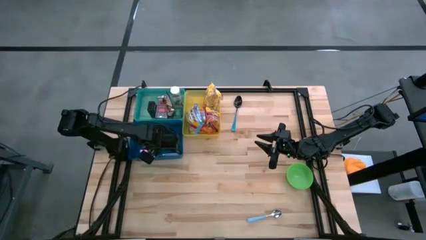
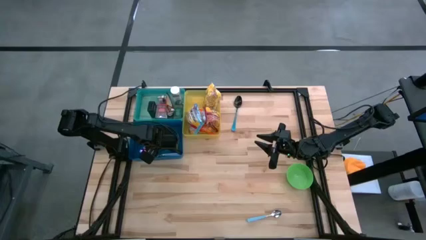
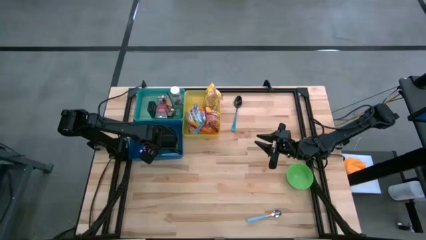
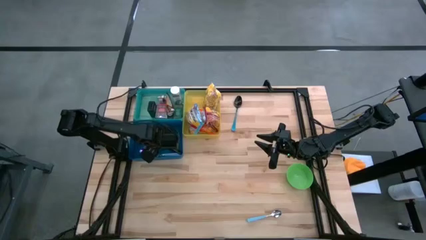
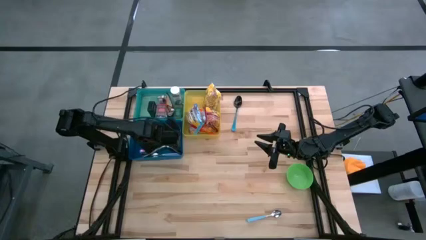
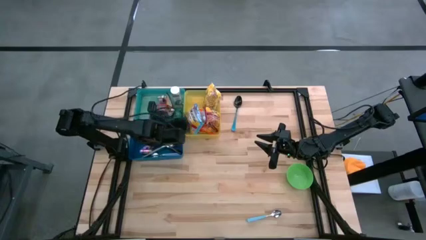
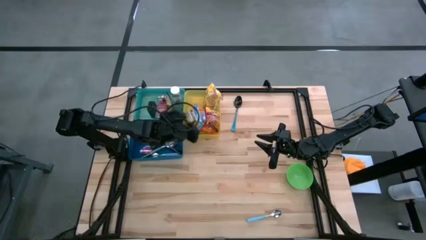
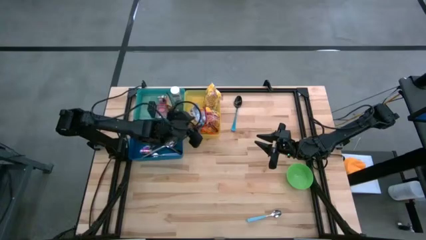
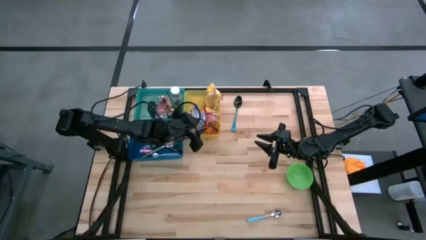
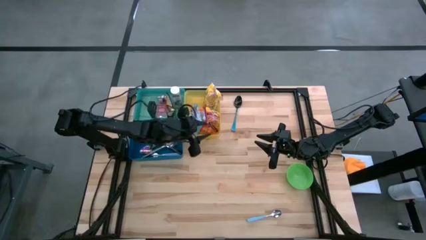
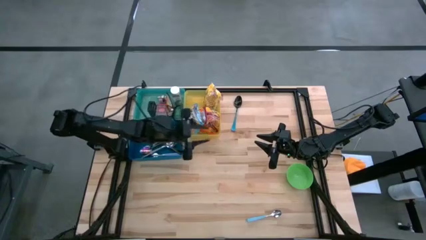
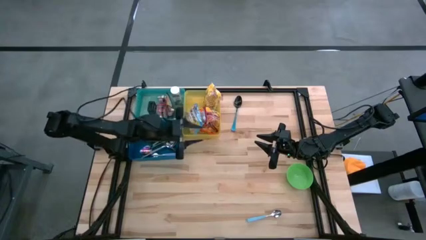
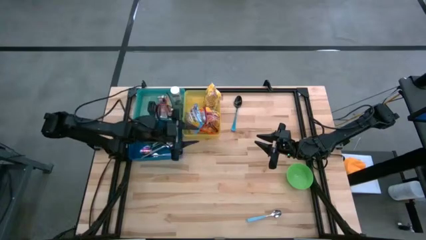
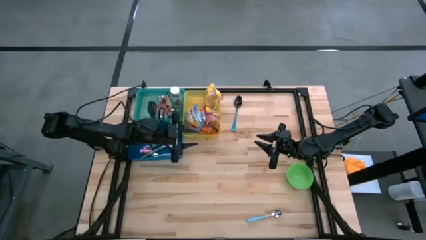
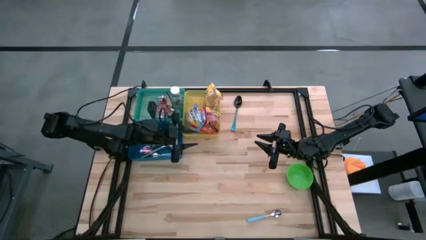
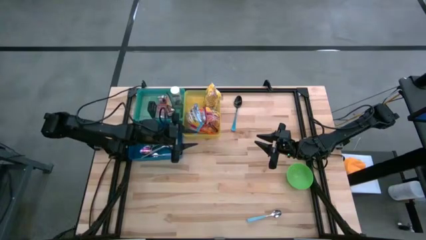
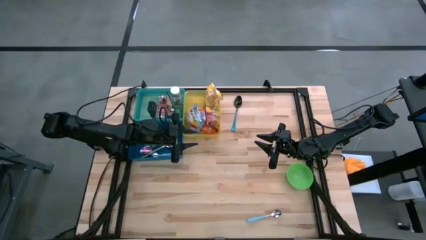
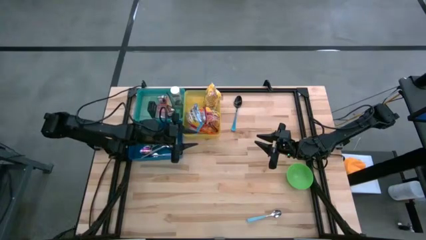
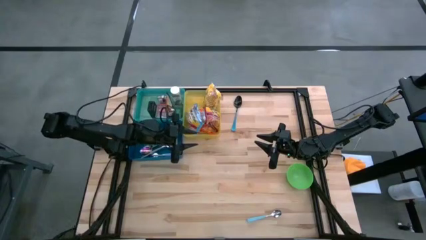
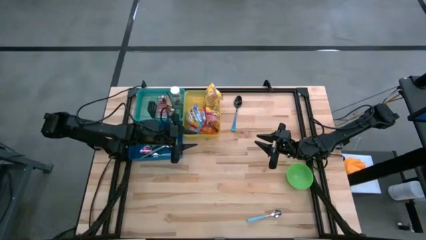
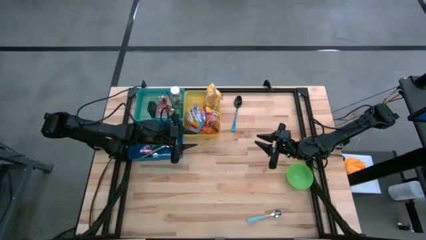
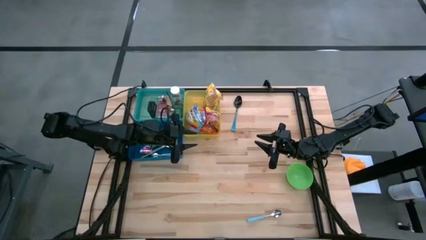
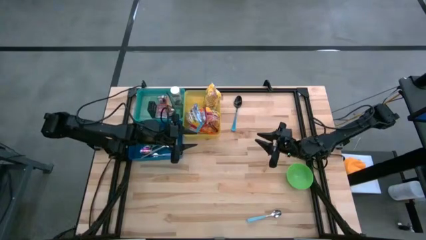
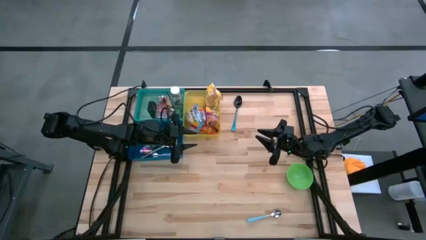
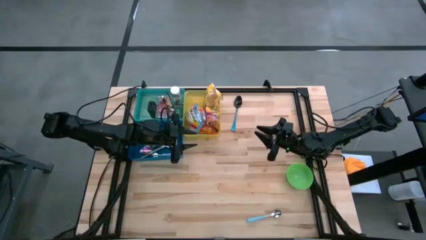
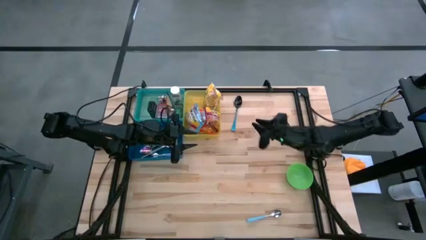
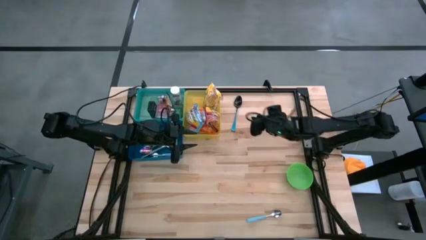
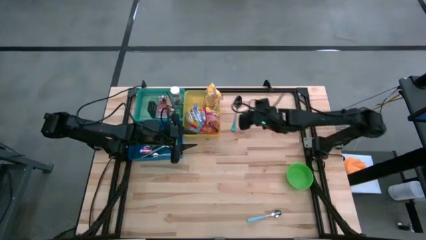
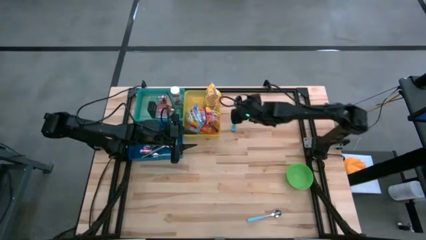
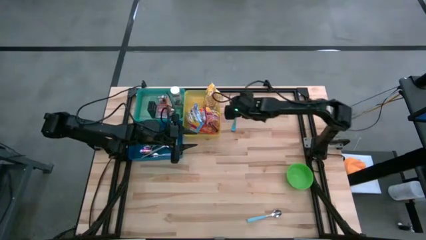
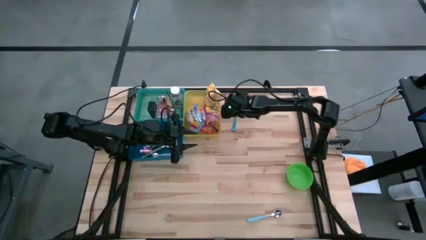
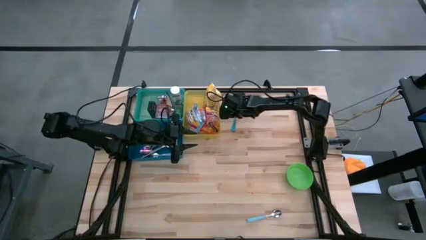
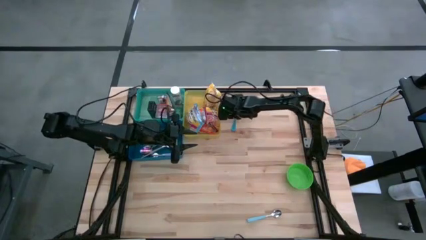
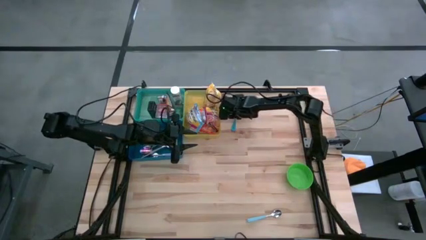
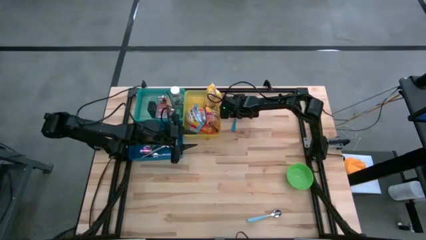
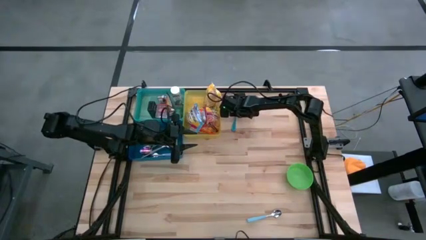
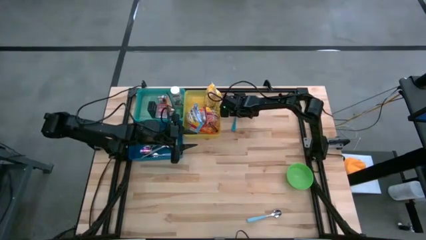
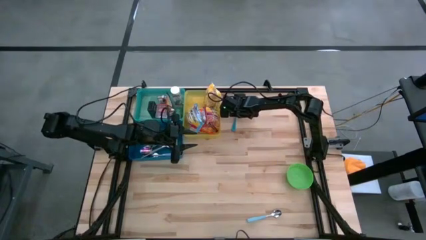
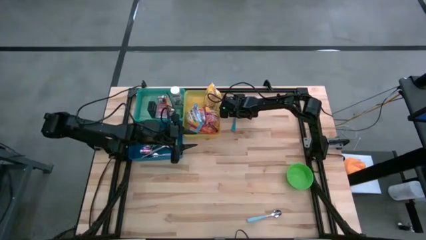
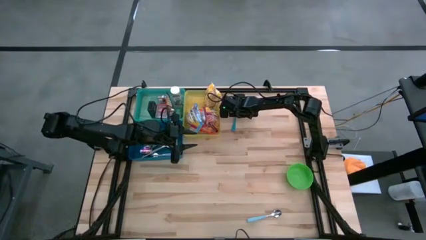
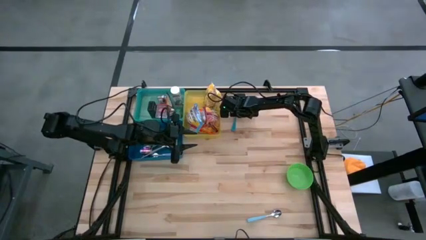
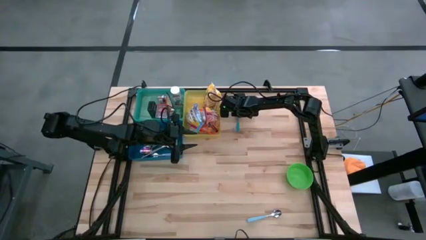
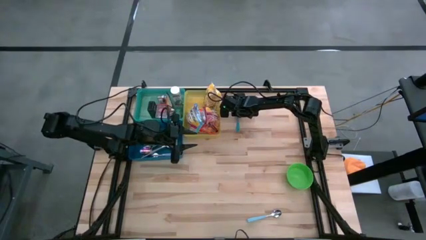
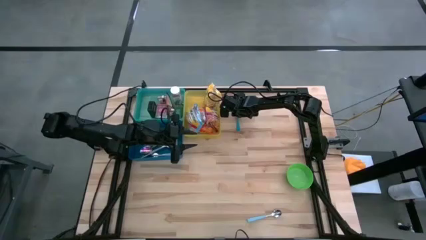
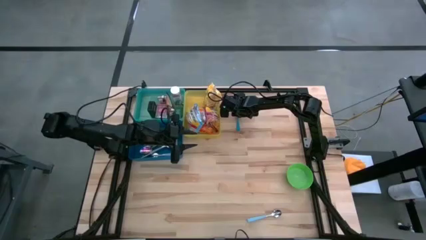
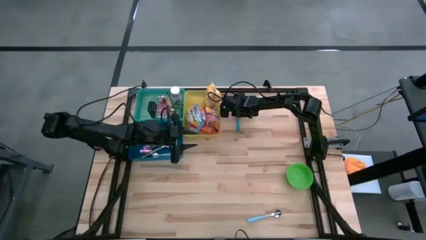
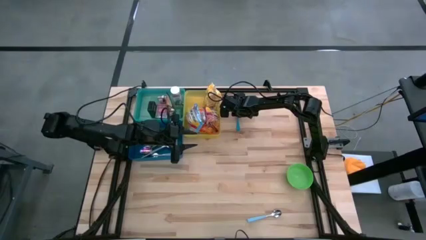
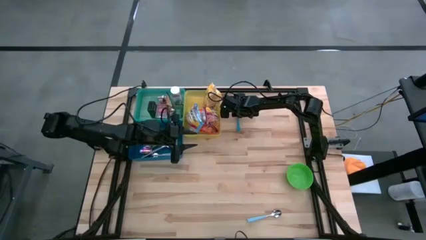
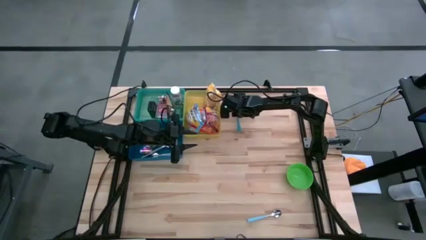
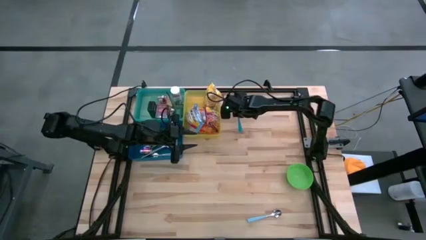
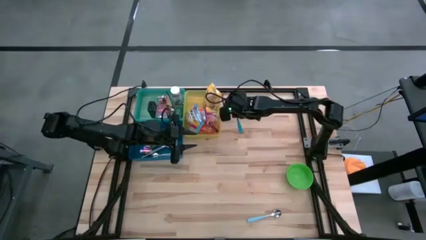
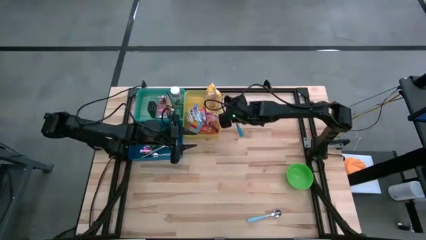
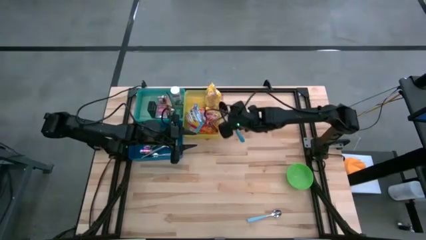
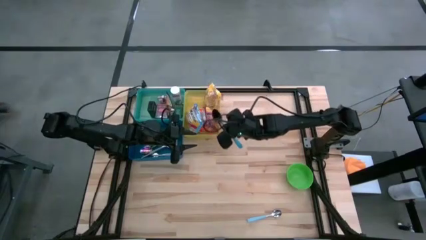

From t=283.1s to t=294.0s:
Put the blue spoon into the blue bin
